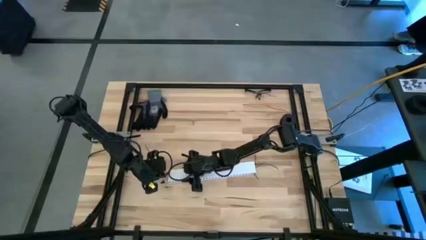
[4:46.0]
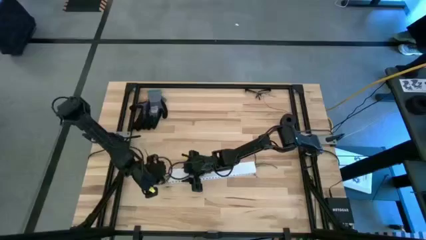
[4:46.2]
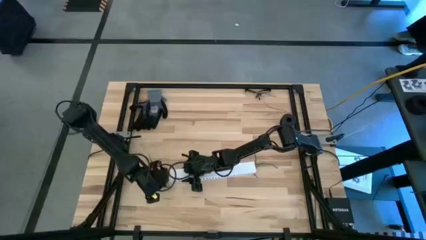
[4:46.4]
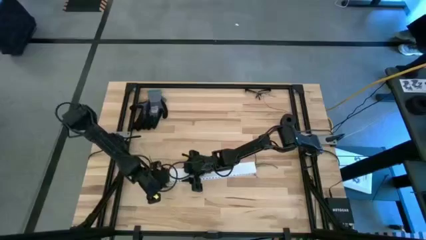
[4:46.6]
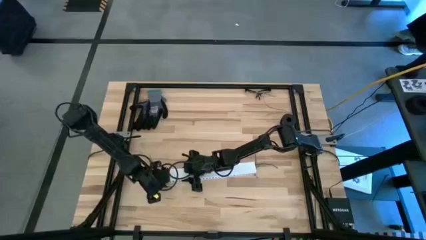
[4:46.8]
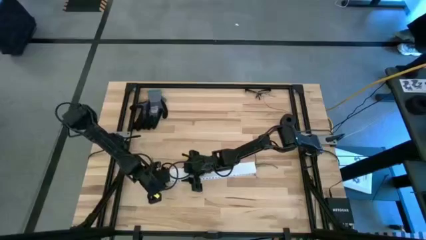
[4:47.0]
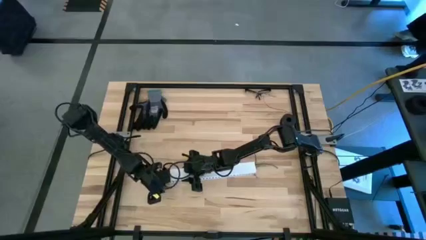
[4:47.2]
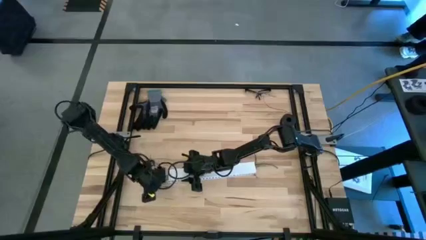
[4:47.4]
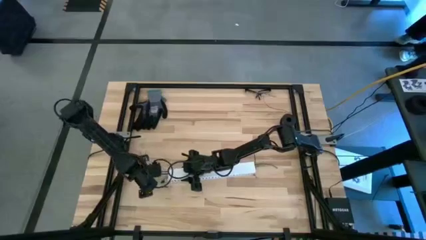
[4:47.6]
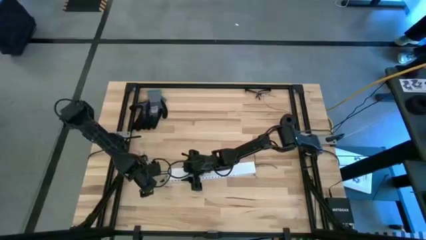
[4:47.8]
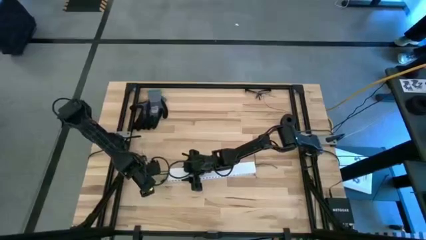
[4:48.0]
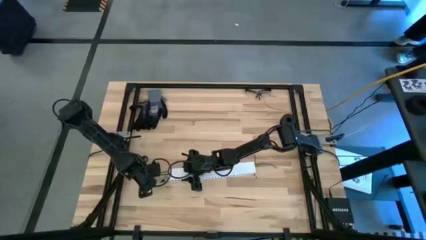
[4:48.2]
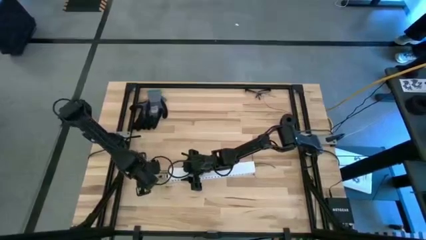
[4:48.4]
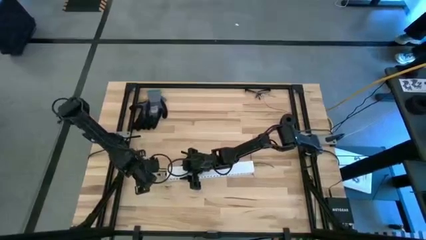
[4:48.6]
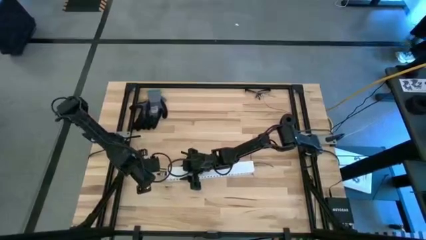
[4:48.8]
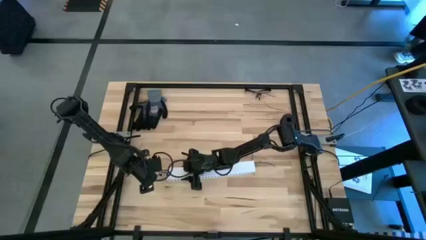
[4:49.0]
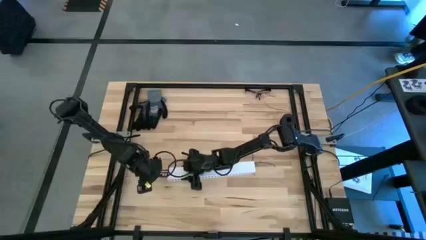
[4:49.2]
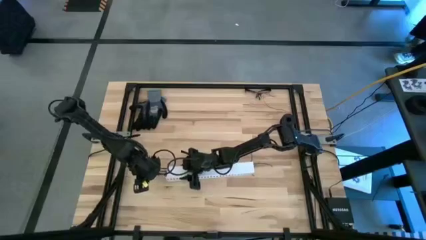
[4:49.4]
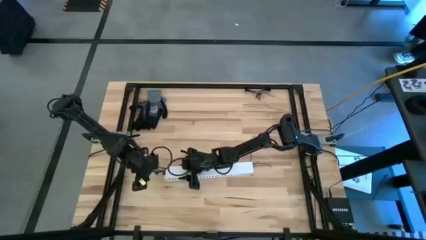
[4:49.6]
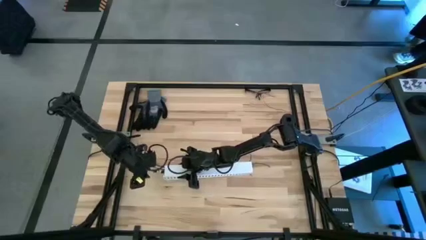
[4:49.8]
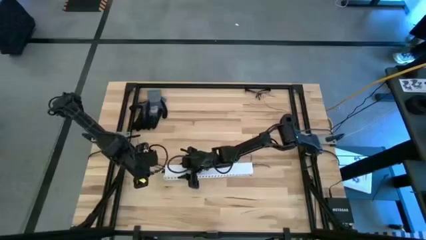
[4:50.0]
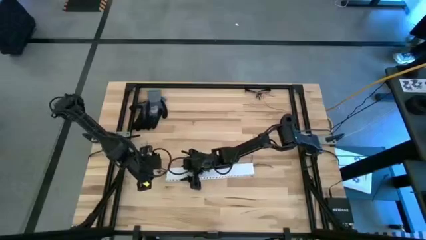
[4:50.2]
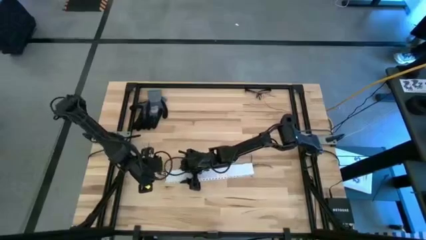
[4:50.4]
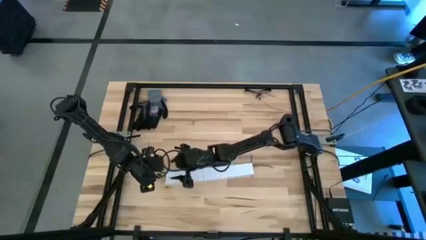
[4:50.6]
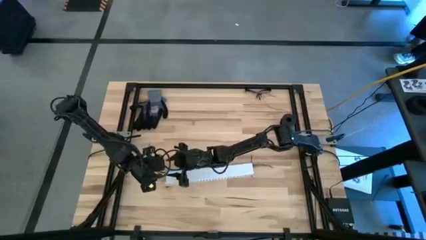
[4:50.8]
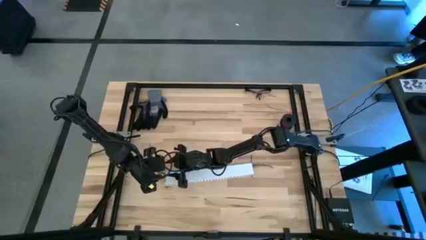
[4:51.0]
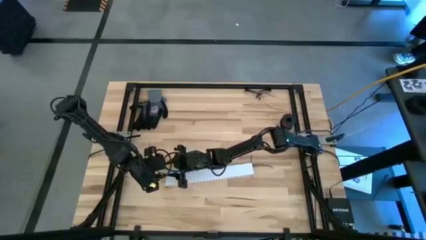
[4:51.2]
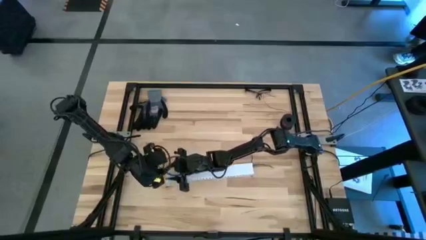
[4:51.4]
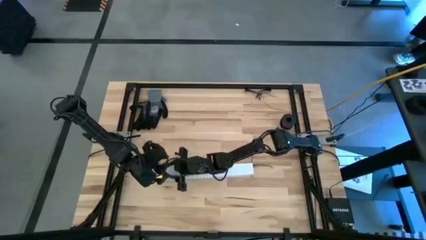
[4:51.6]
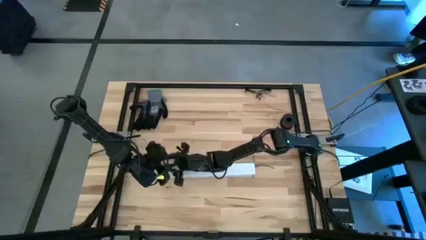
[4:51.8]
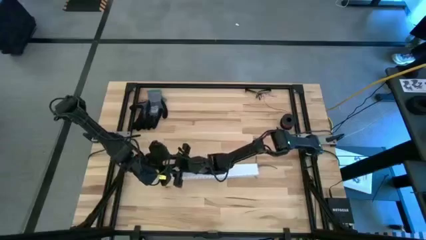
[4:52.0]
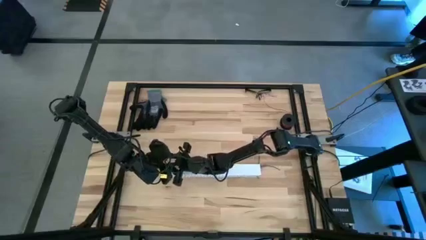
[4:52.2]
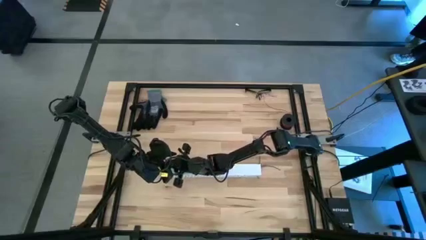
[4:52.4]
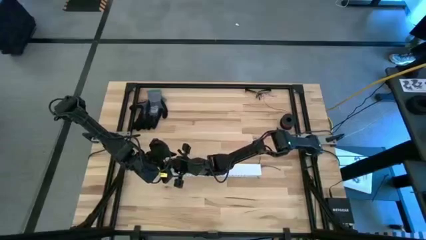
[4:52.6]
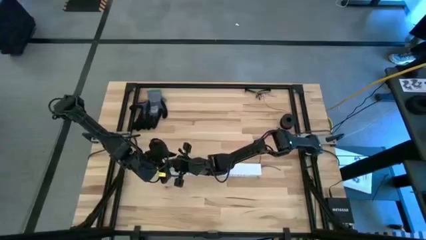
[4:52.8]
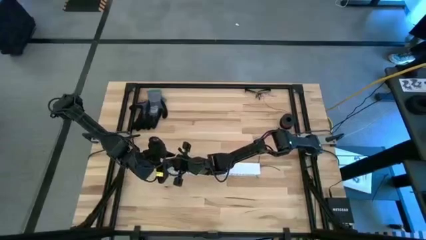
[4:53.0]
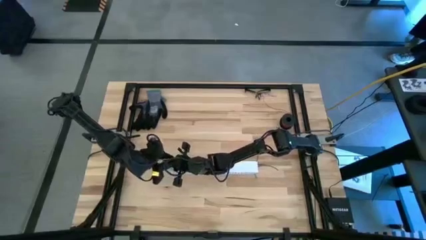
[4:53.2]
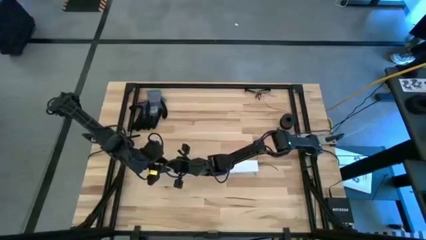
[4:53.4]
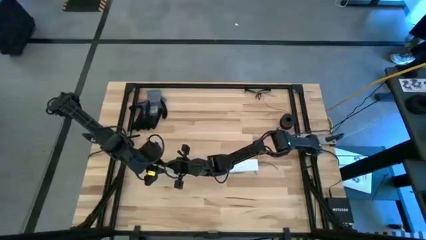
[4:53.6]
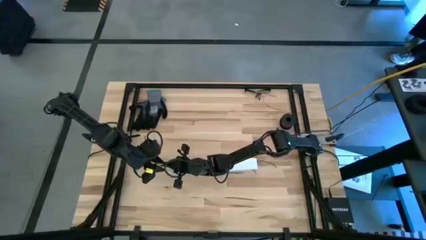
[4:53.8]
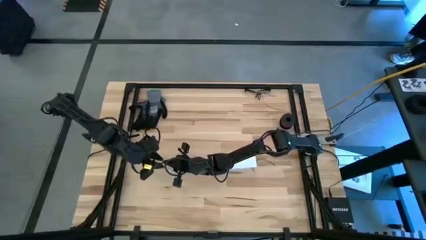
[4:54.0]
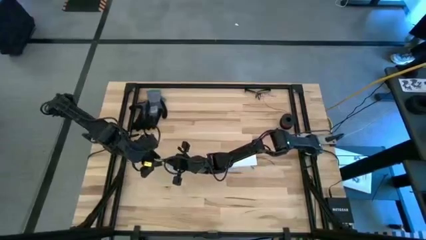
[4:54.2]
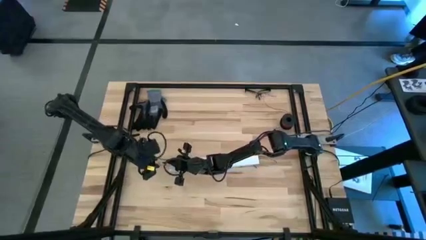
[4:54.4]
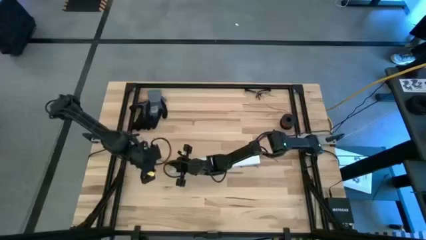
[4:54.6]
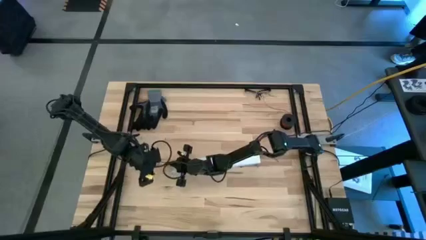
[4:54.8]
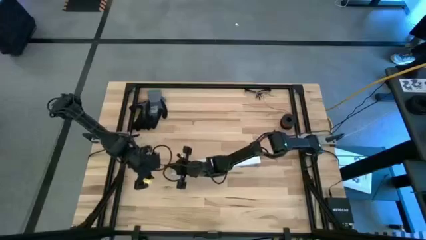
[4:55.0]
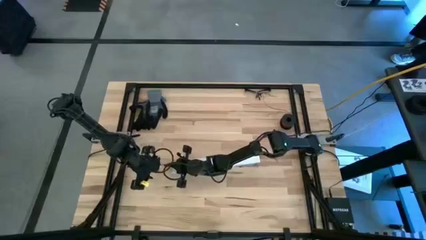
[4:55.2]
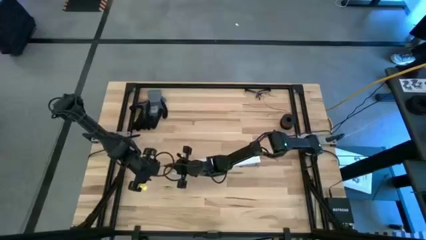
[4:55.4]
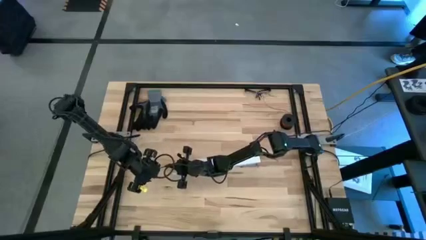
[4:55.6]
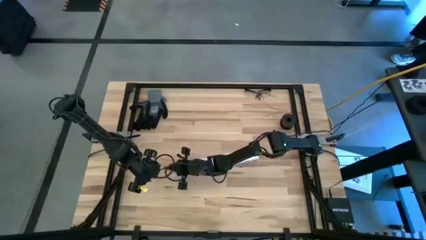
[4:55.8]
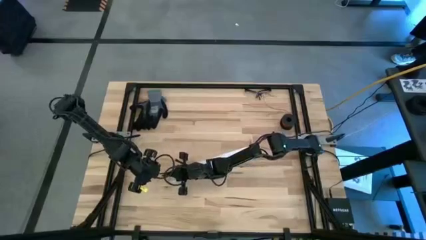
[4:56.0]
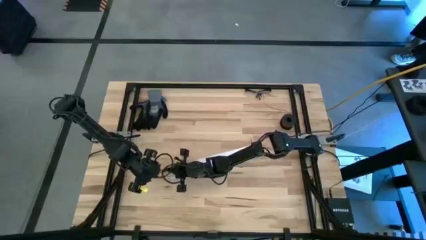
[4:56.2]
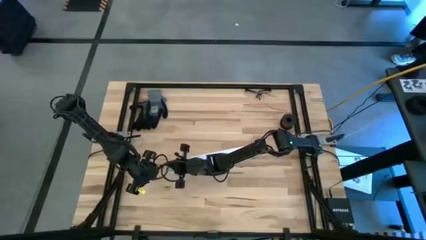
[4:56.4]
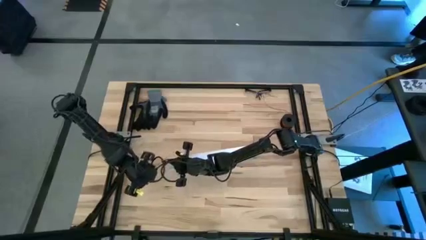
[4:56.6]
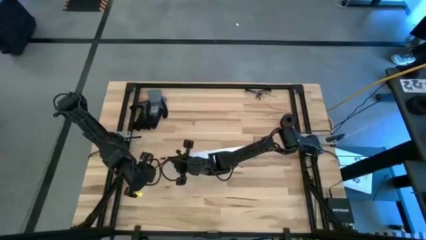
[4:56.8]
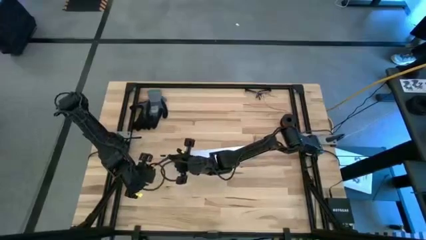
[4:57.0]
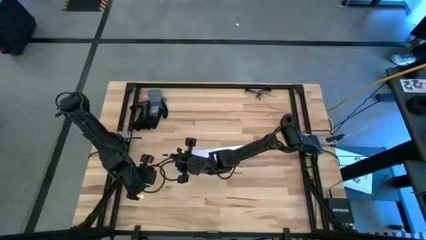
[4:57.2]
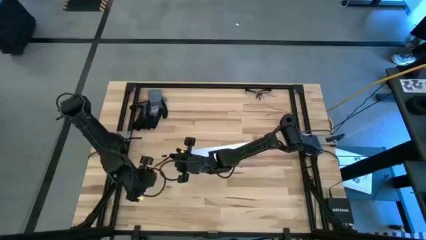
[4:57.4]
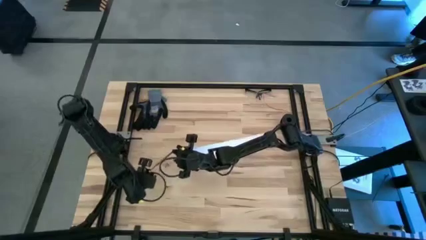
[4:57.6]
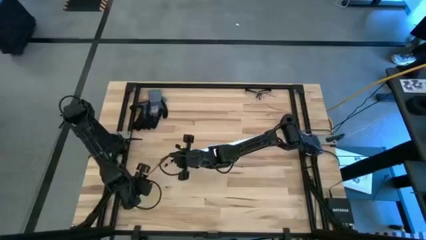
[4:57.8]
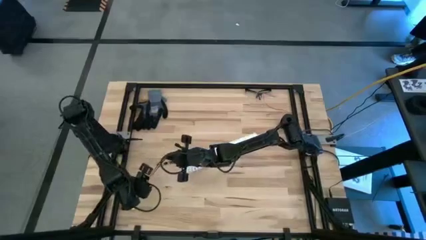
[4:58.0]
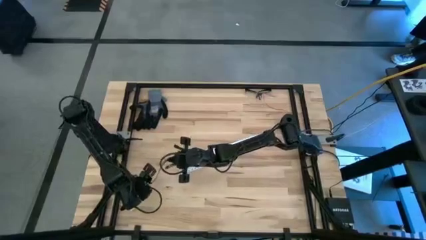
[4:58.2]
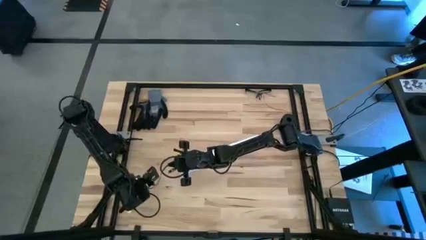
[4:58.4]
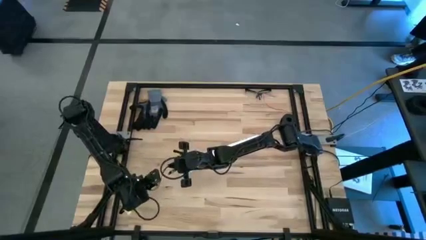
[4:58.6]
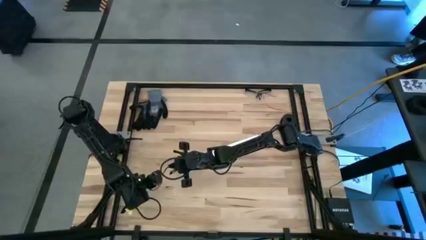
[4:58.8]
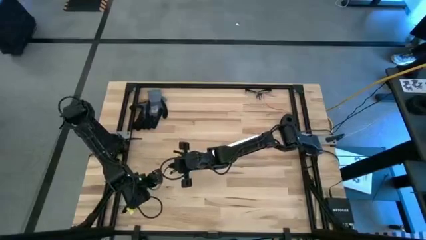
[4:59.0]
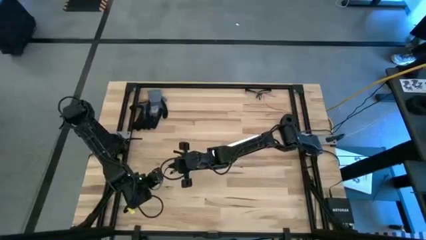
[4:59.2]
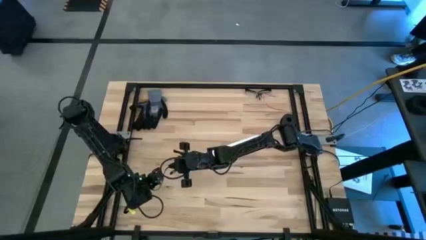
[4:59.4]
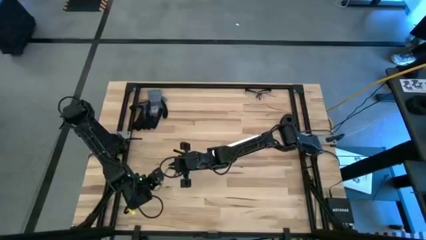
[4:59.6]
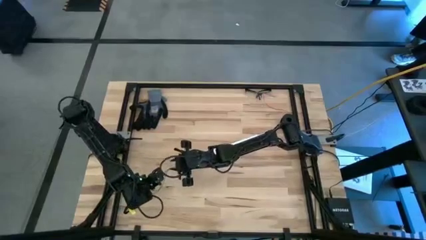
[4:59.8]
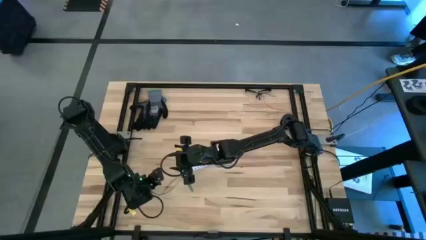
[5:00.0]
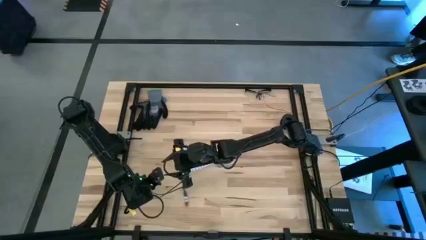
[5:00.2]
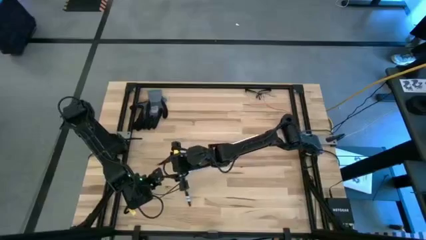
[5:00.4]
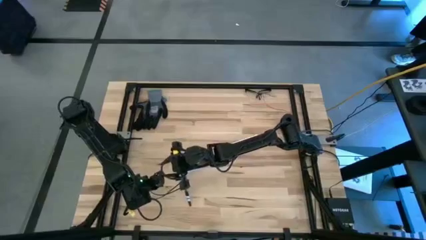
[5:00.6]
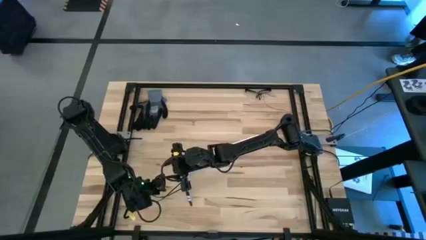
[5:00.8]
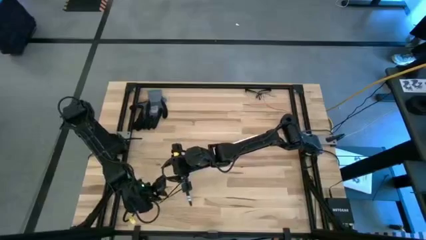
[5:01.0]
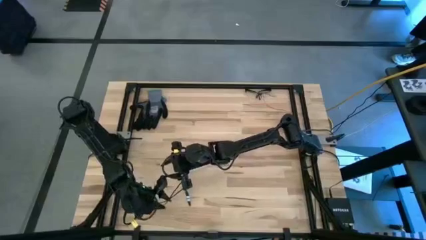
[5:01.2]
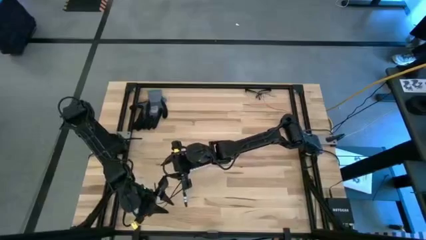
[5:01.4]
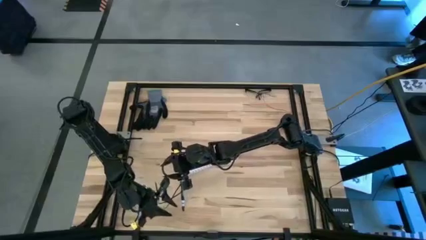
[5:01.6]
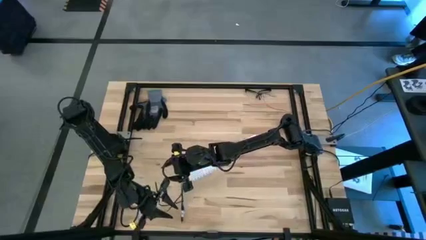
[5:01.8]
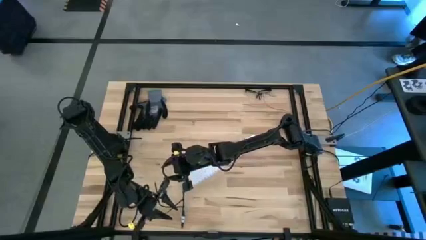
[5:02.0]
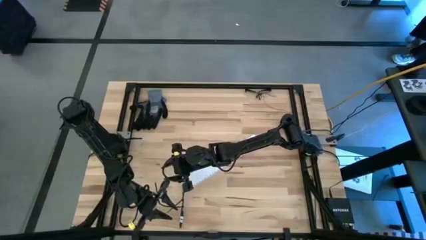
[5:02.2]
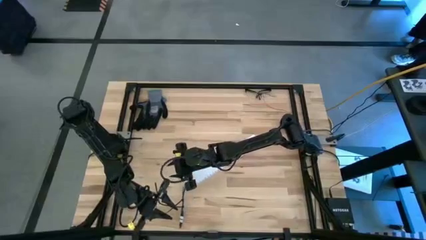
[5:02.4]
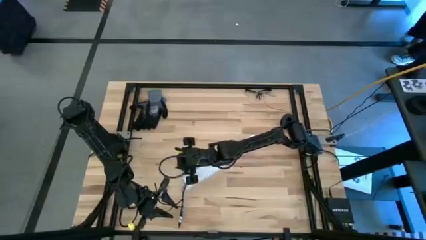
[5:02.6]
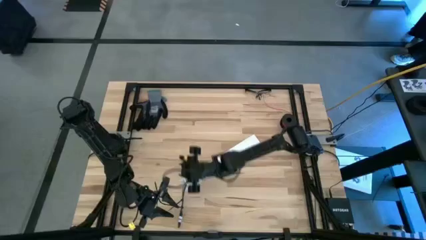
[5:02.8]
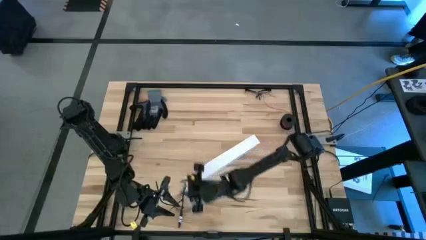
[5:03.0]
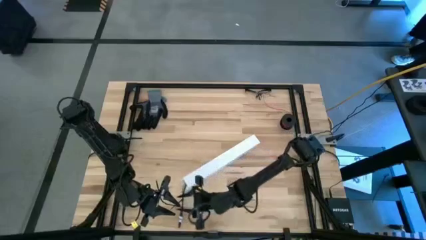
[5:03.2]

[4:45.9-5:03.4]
Task: Ziptie cables
Close the white cable duct
